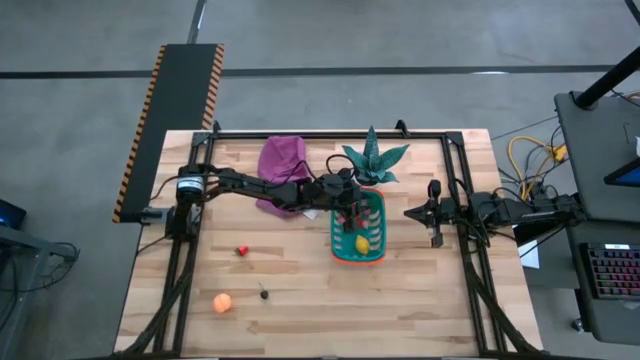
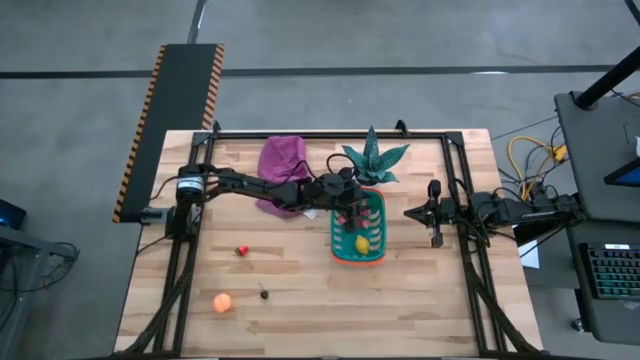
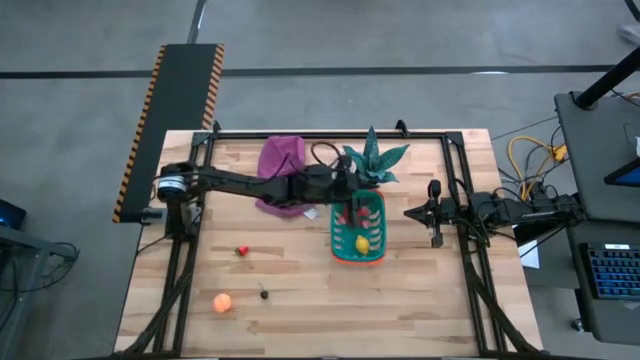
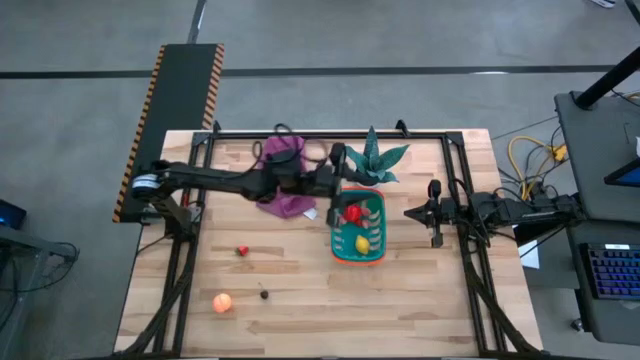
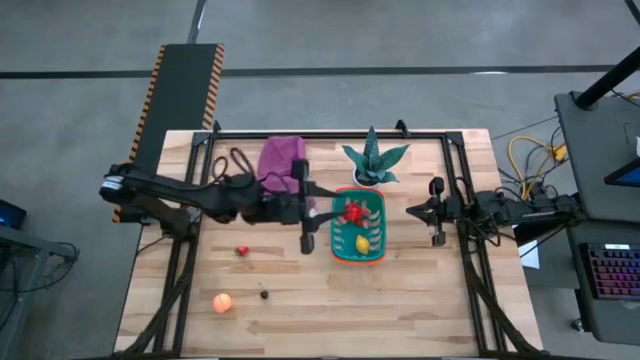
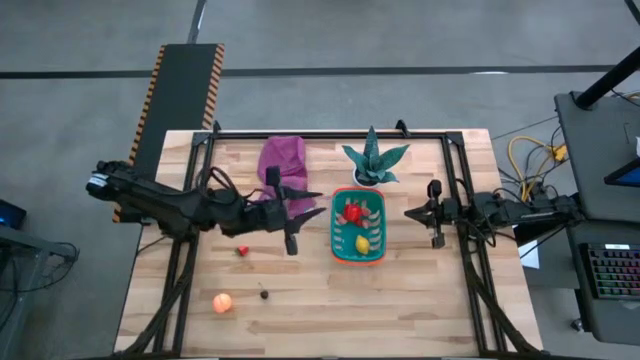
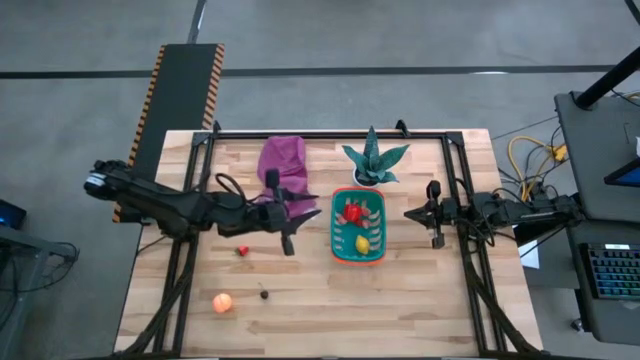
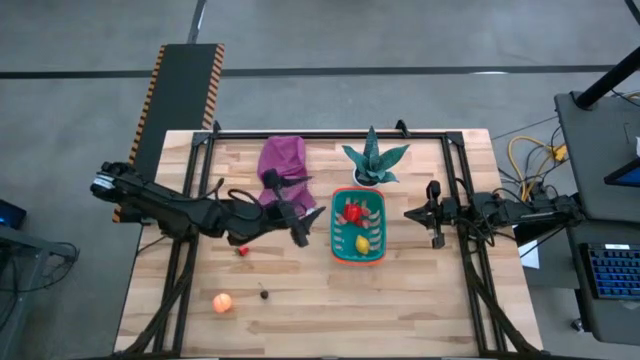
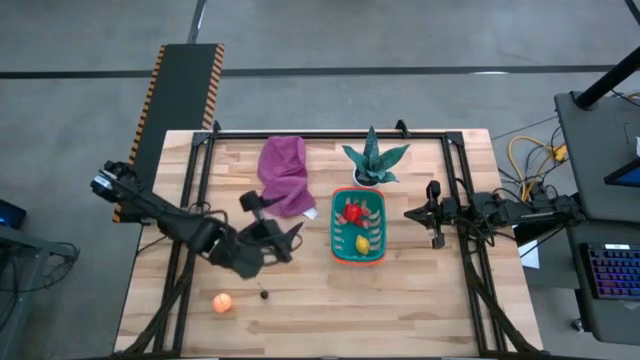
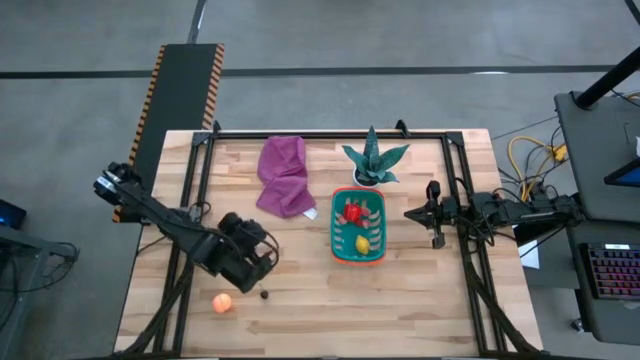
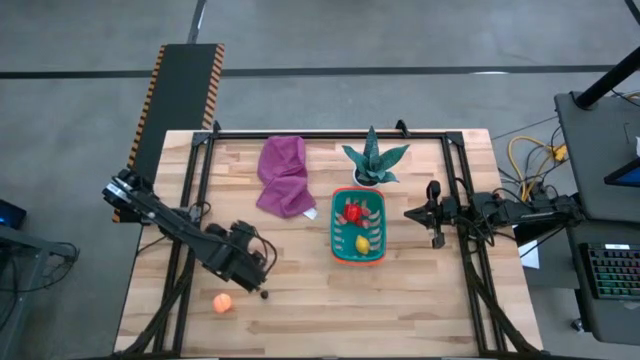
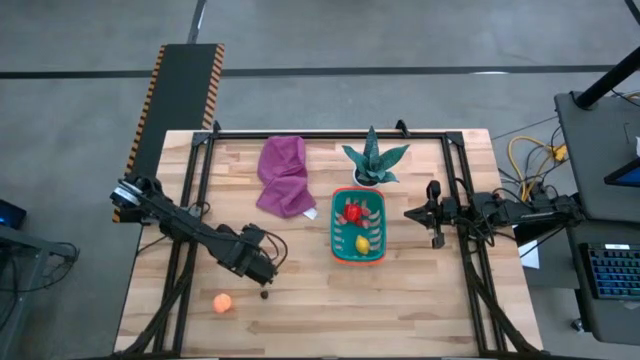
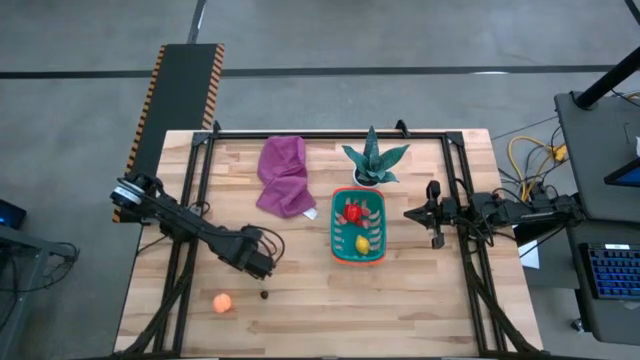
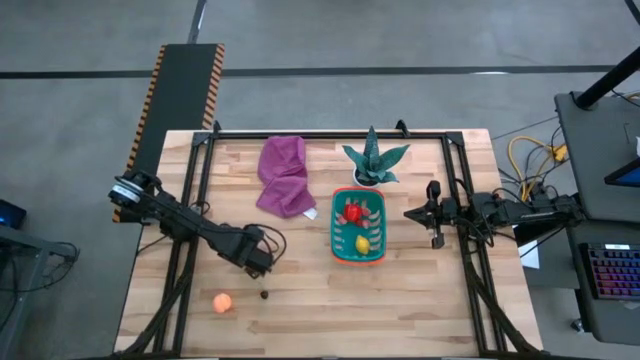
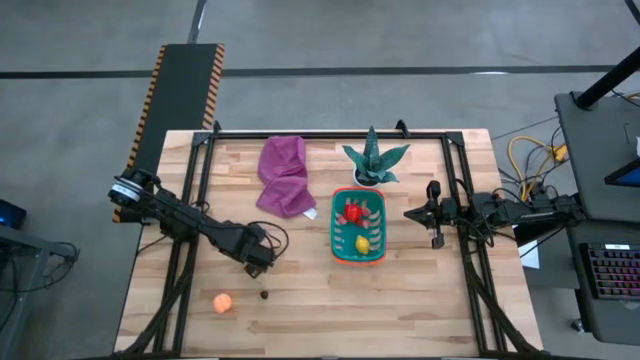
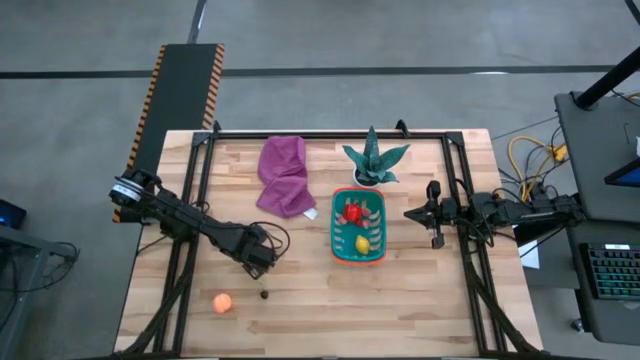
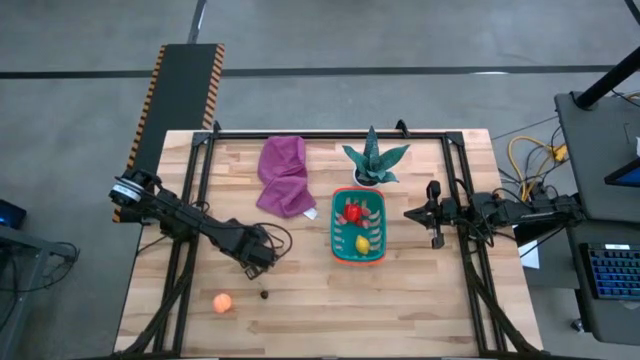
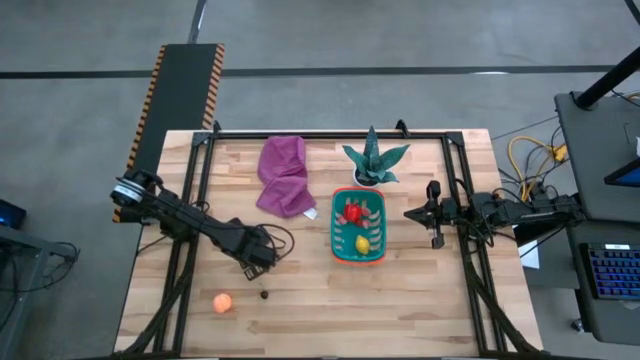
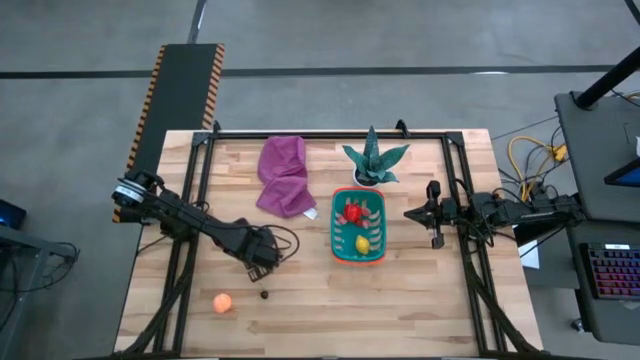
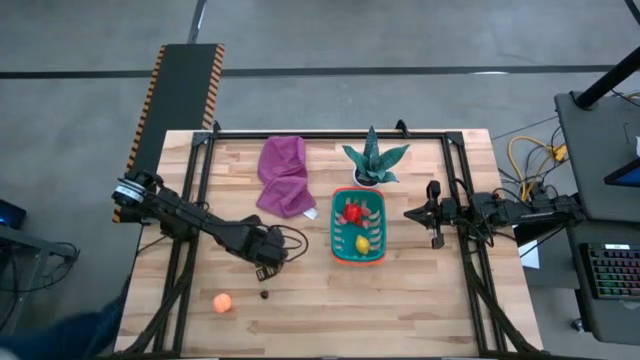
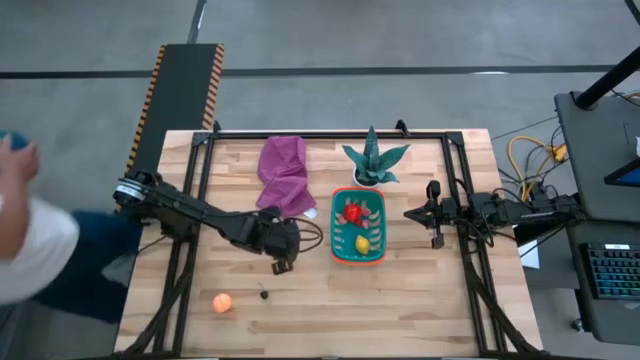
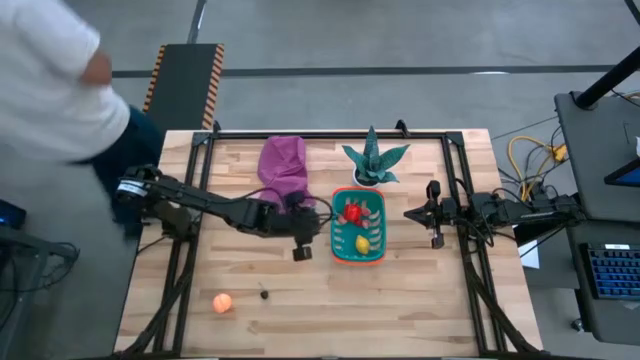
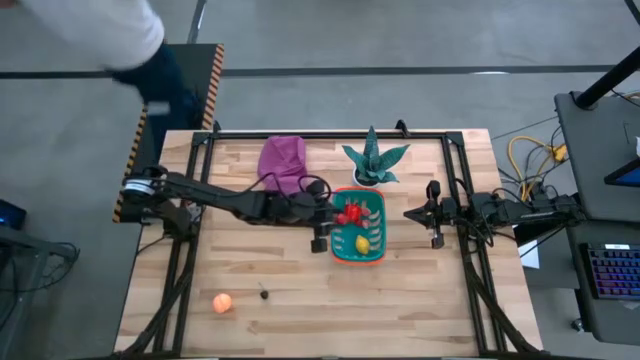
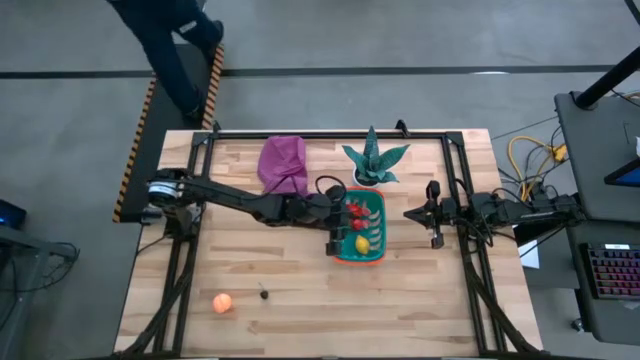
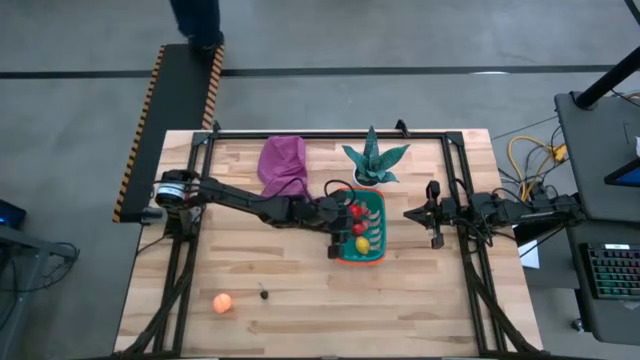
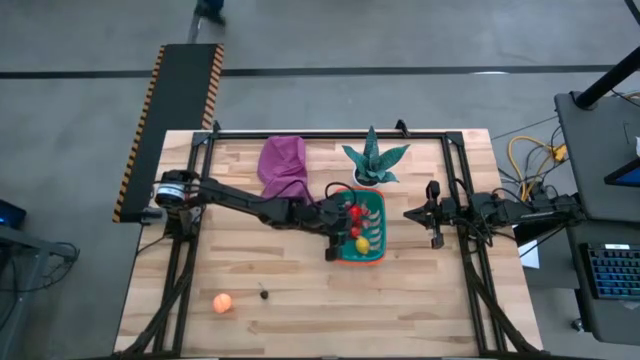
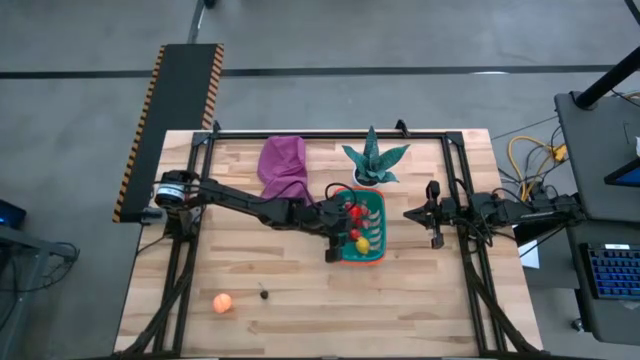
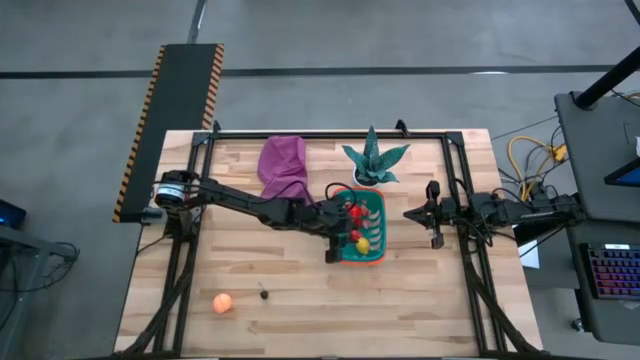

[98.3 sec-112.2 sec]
Task: Pick and placing Produce into tupperware
Put the red strawberry into the blue basket

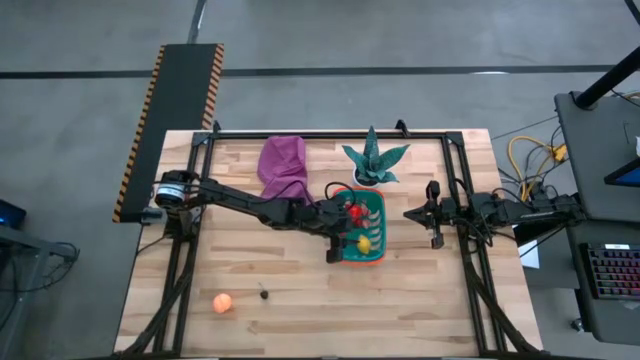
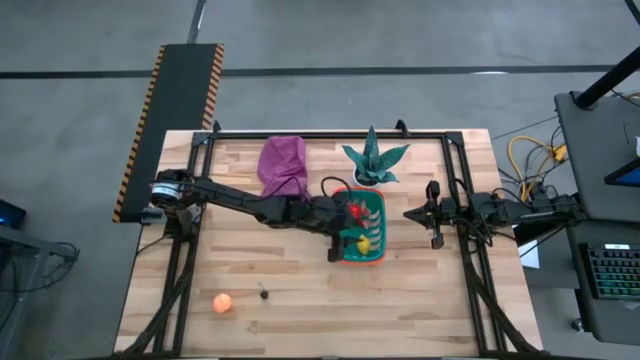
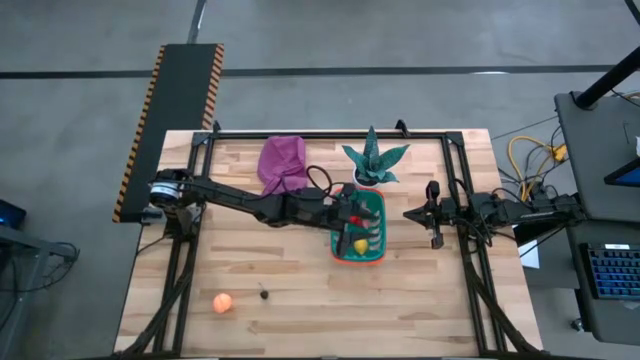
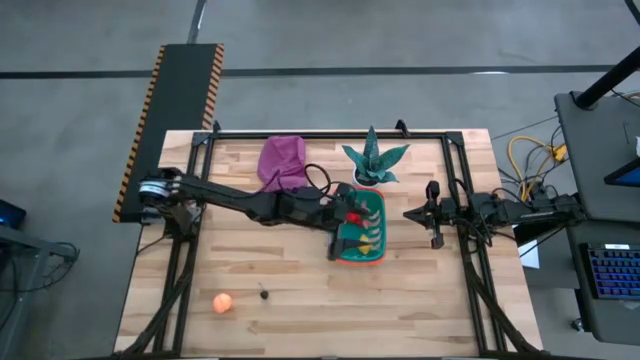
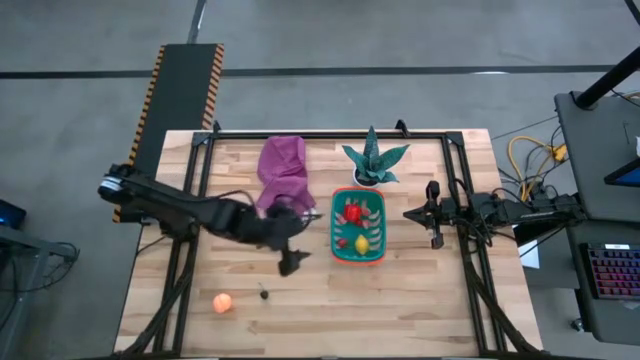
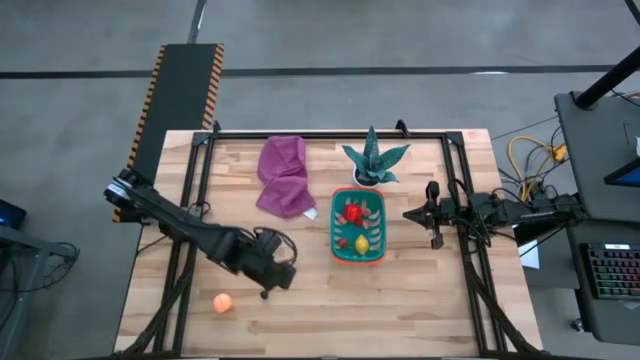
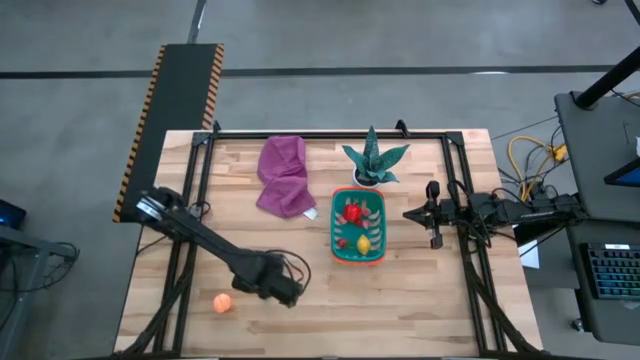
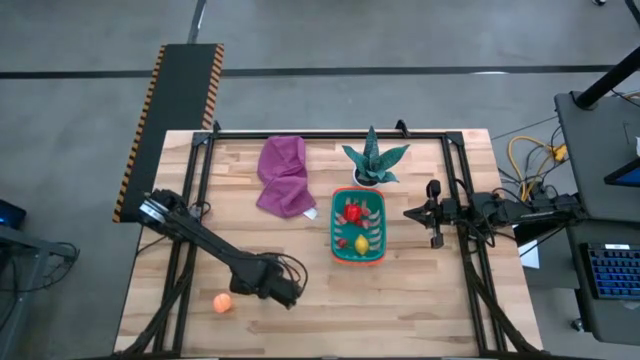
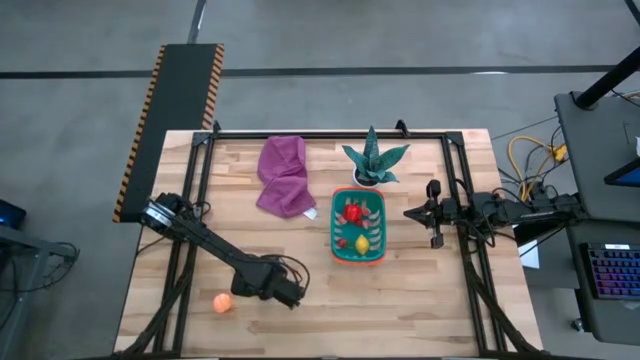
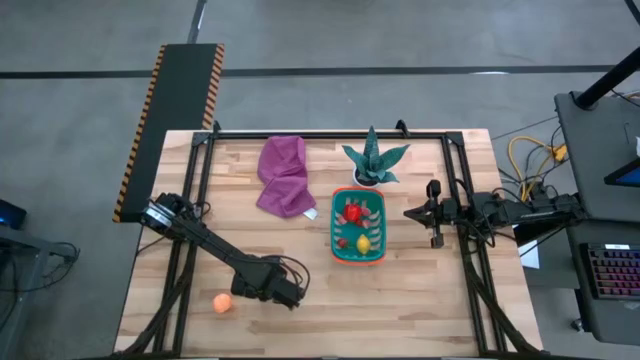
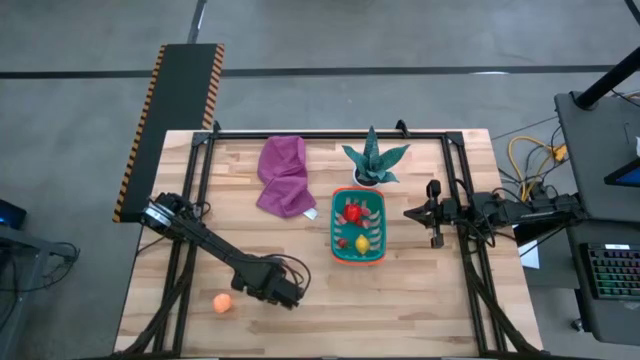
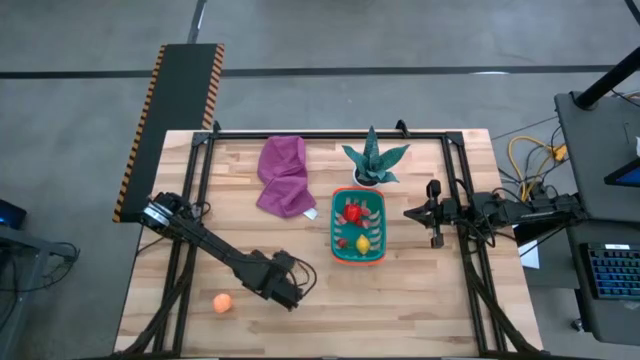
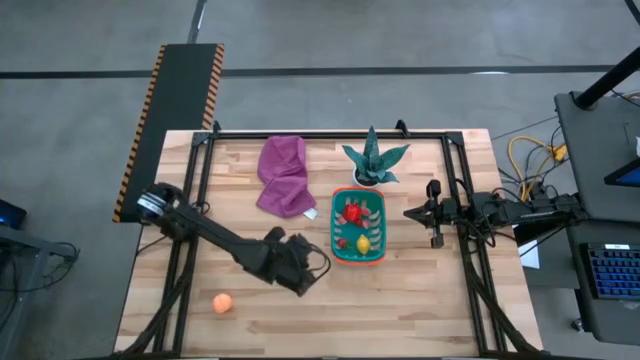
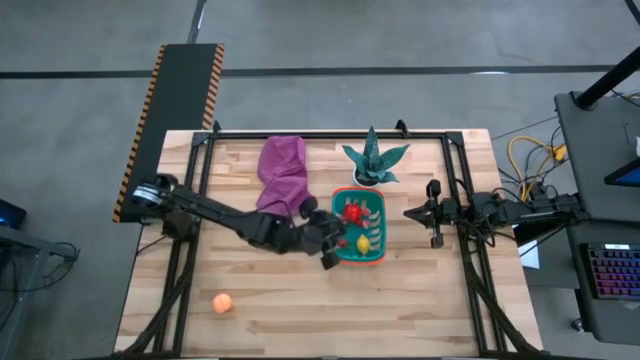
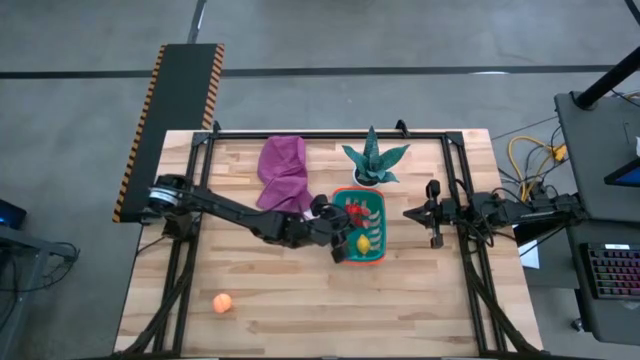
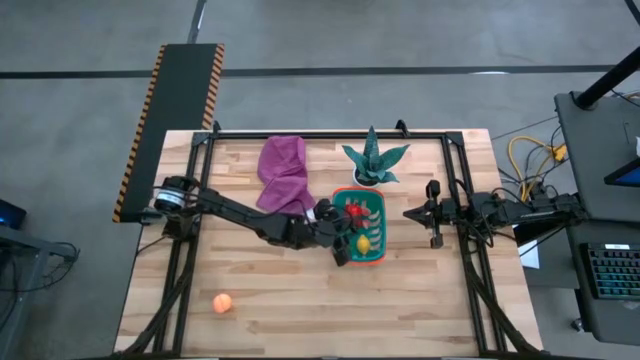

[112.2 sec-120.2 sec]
Put the black cherry into the blue basket
